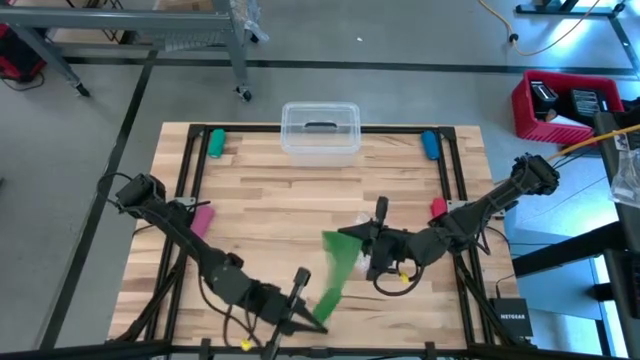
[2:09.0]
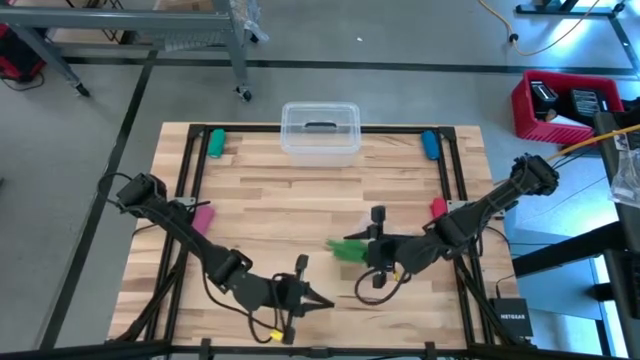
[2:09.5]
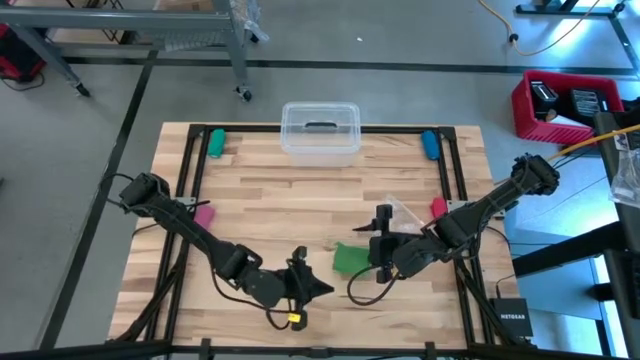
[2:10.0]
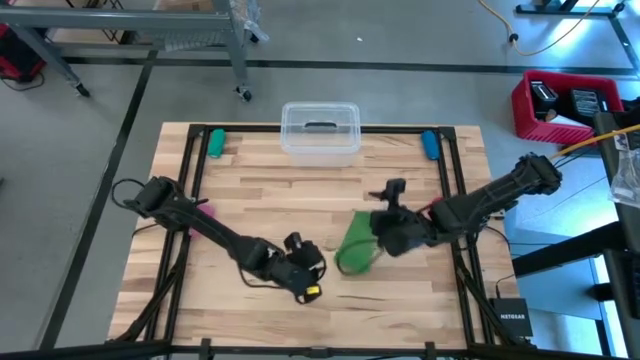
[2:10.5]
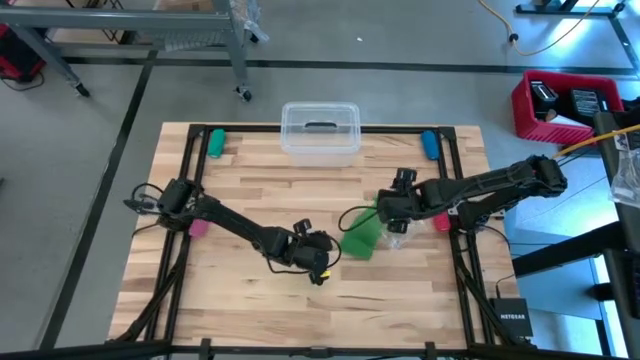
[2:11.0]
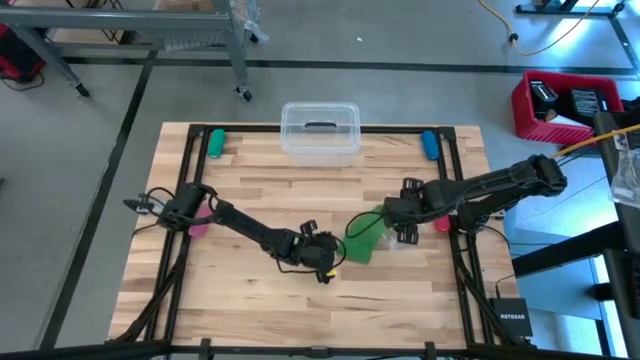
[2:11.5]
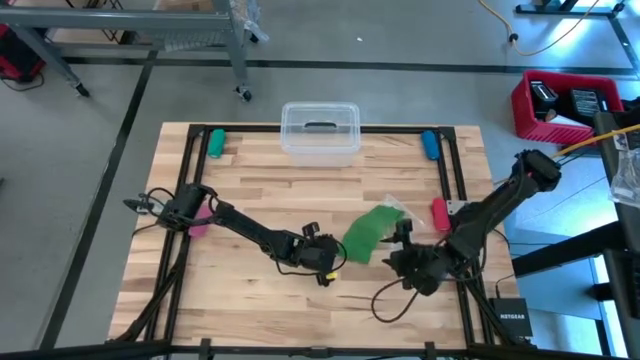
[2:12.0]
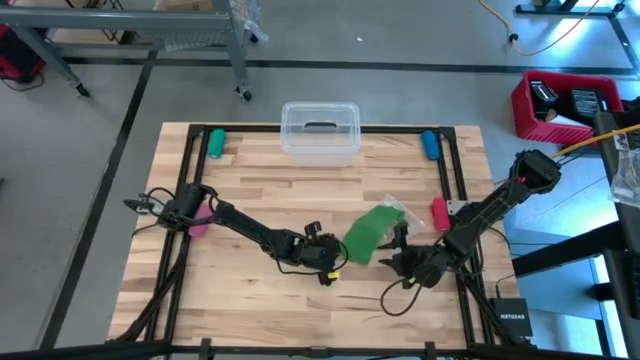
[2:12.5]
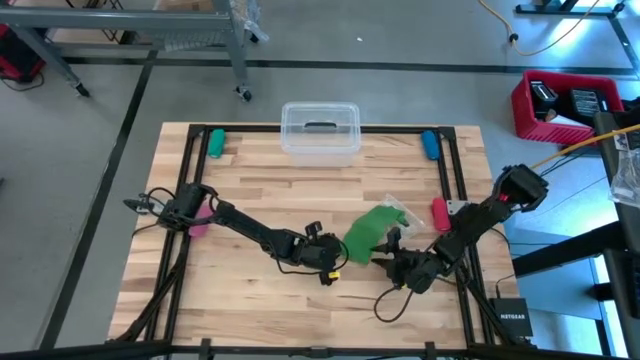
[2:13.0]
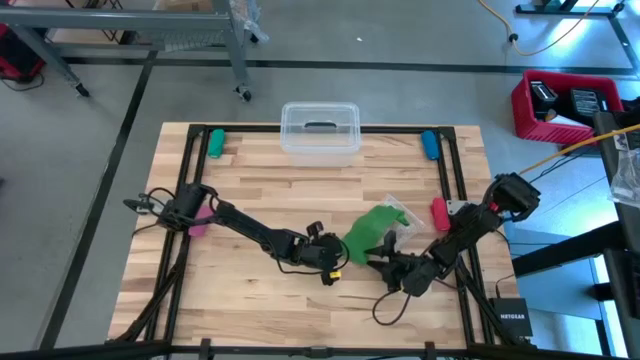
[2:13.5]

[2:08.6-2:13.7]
Task: Roll bandage
Roll the green bandage

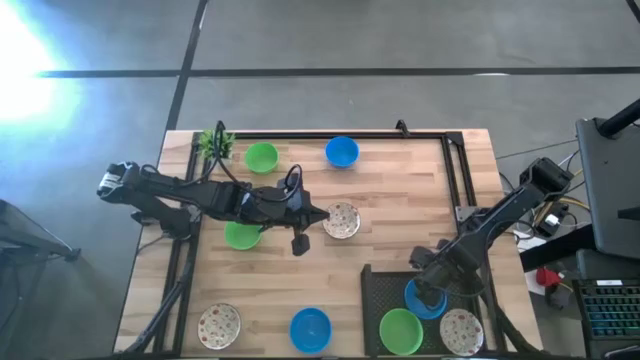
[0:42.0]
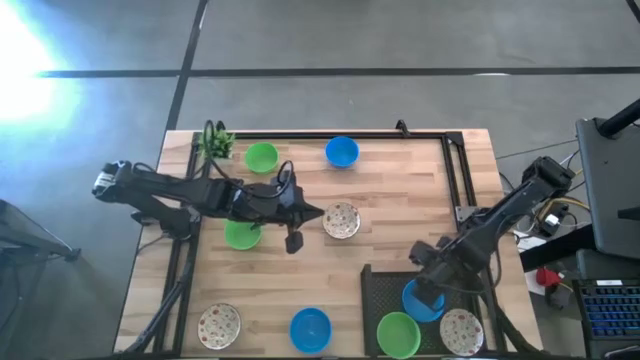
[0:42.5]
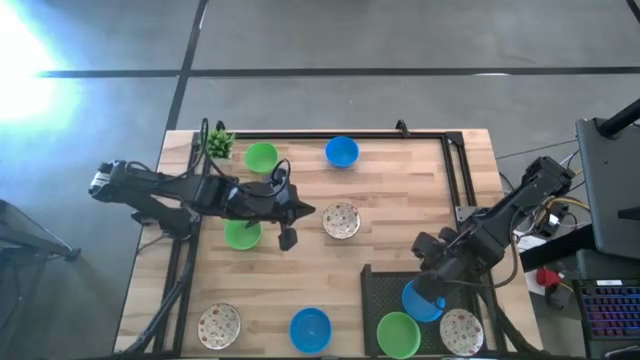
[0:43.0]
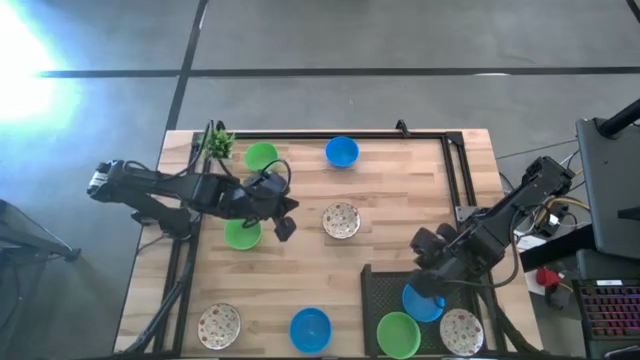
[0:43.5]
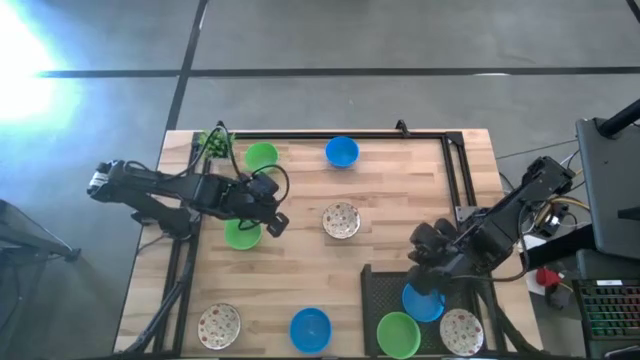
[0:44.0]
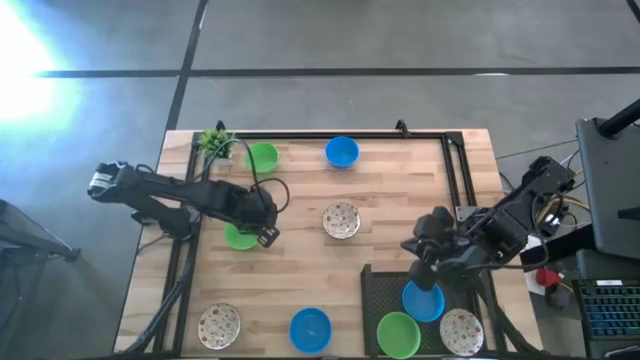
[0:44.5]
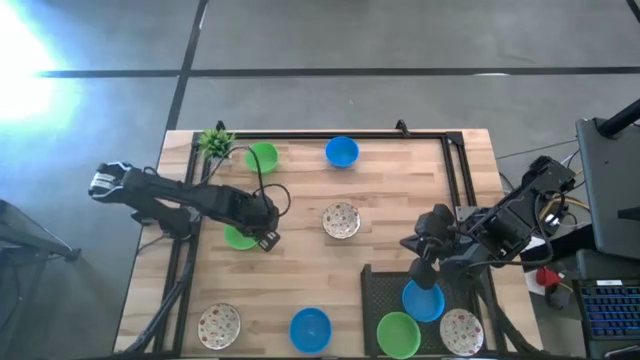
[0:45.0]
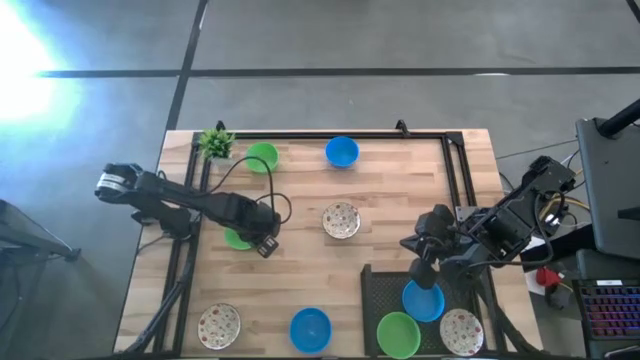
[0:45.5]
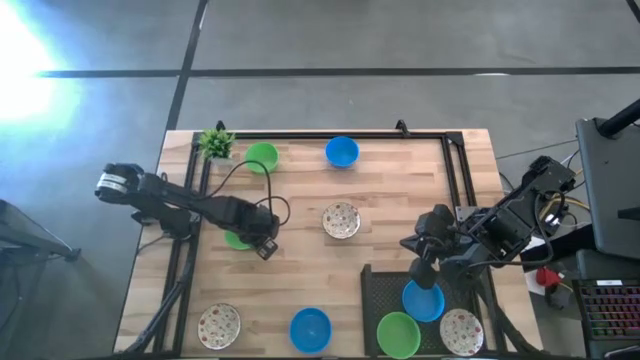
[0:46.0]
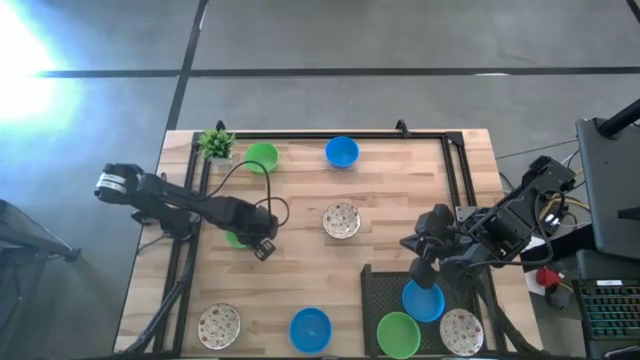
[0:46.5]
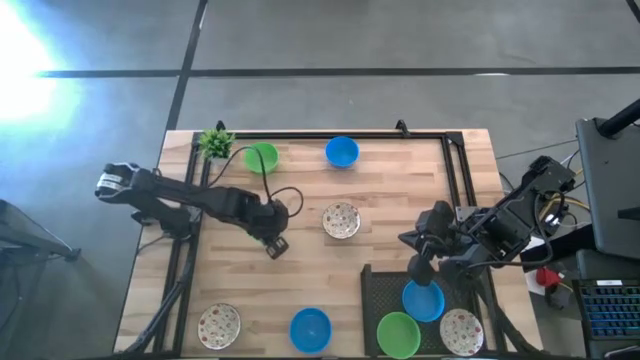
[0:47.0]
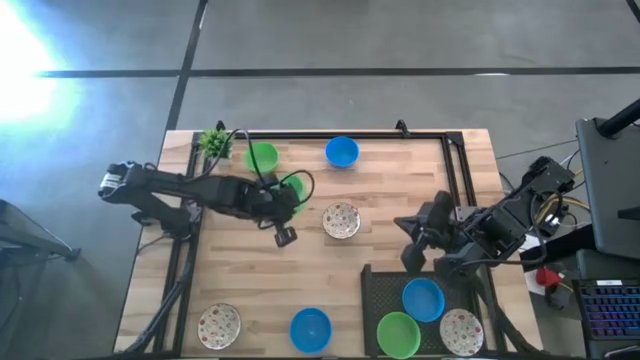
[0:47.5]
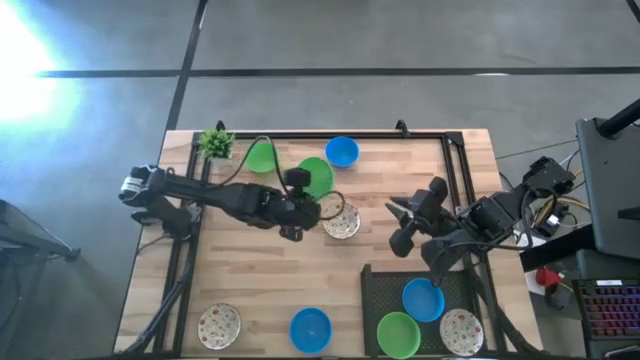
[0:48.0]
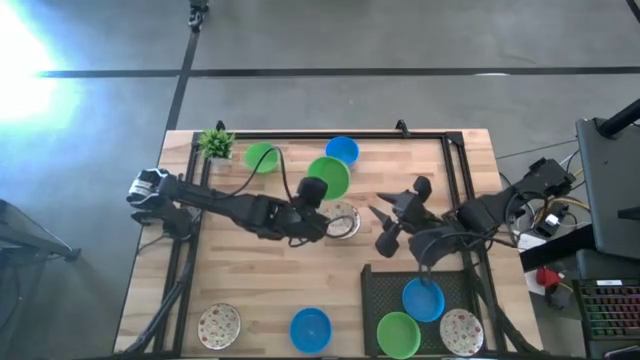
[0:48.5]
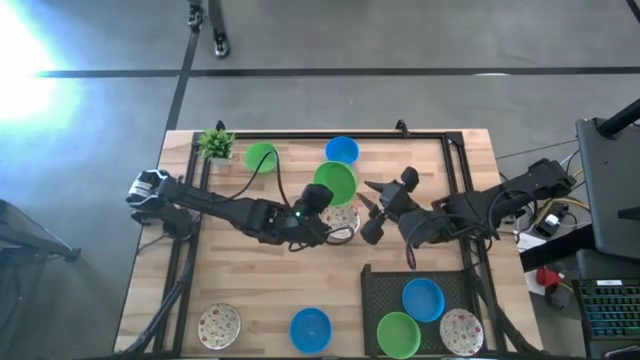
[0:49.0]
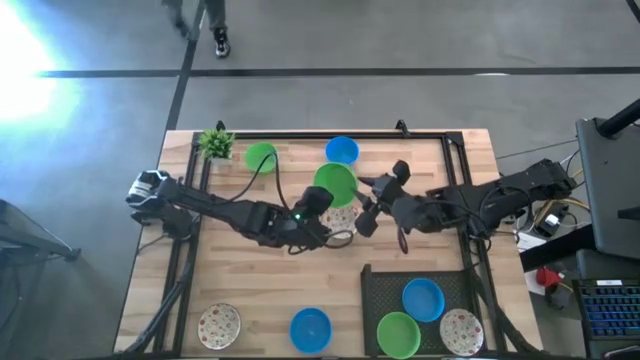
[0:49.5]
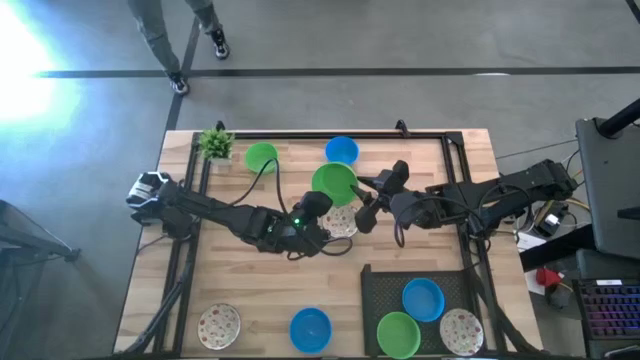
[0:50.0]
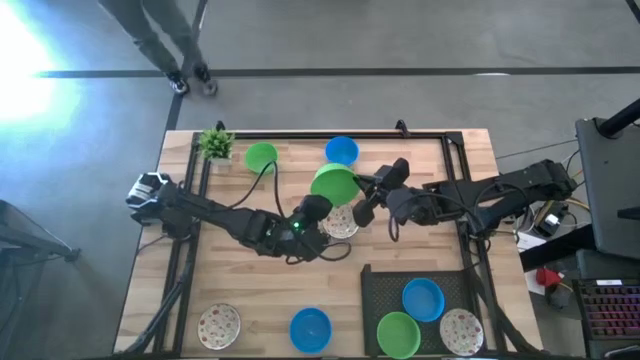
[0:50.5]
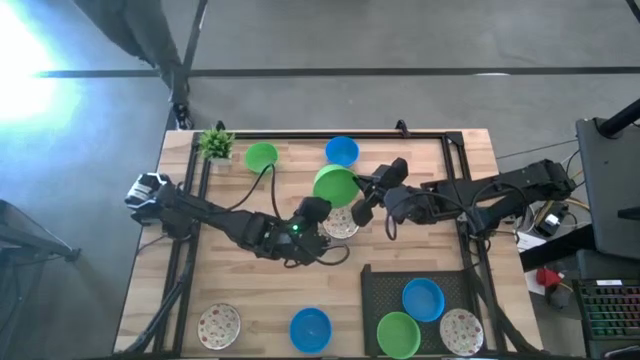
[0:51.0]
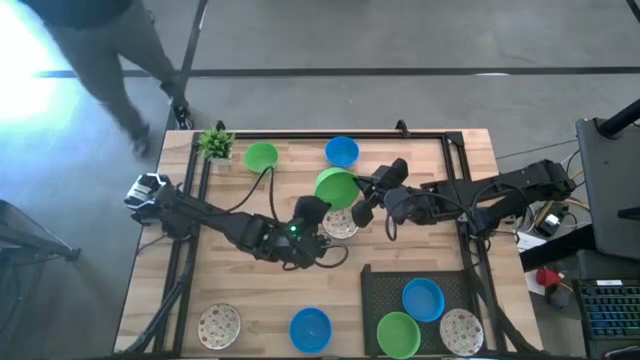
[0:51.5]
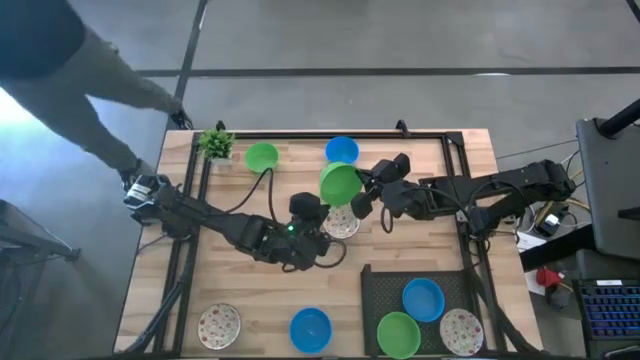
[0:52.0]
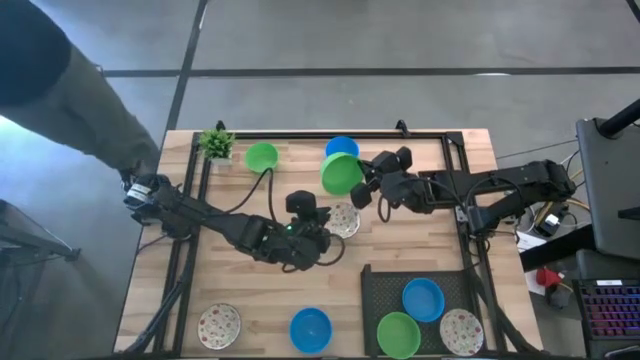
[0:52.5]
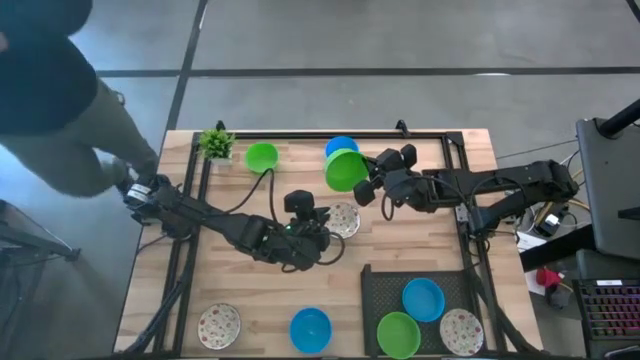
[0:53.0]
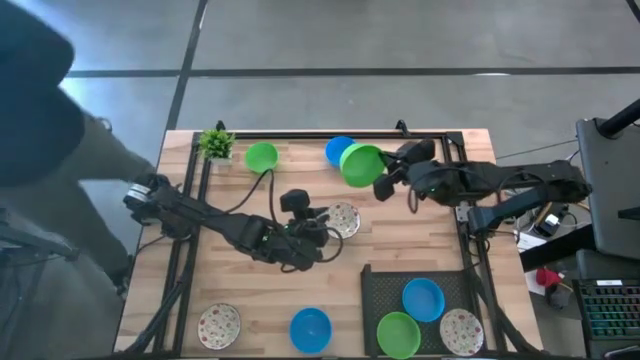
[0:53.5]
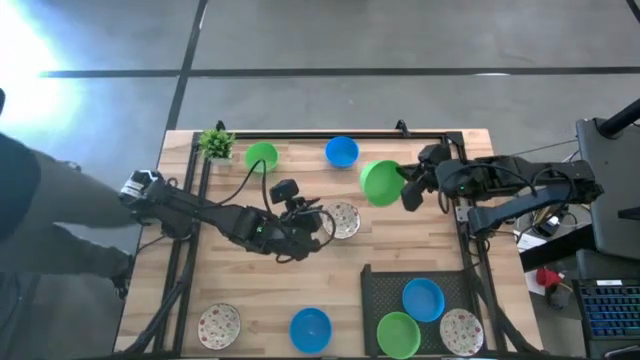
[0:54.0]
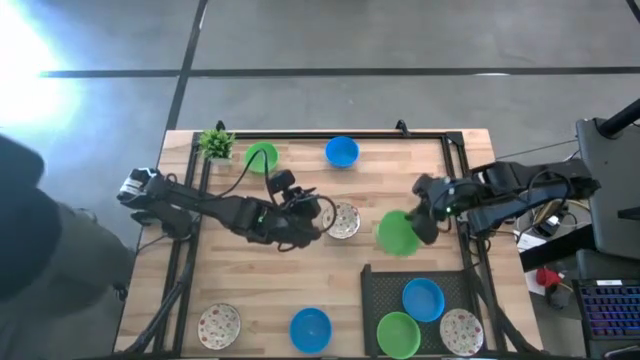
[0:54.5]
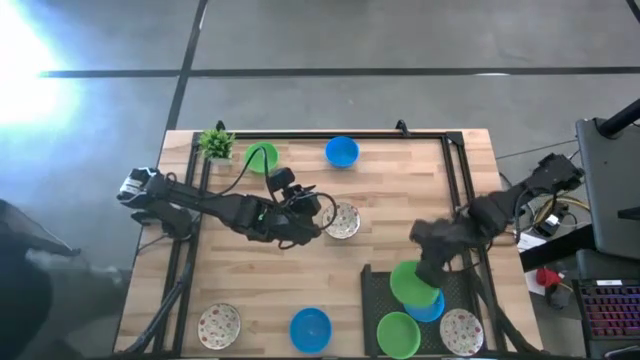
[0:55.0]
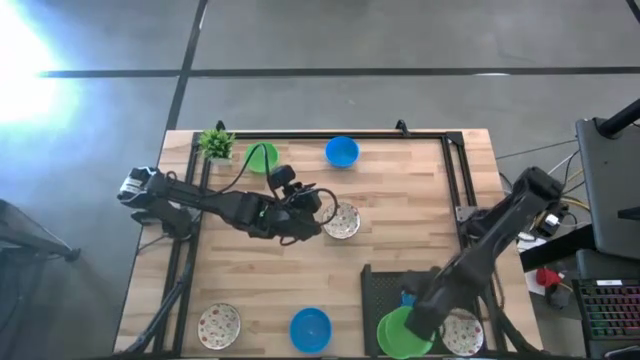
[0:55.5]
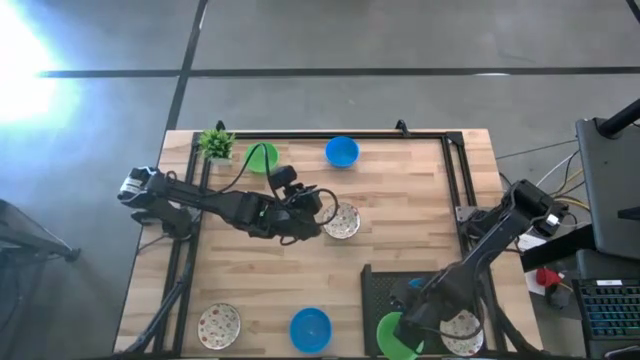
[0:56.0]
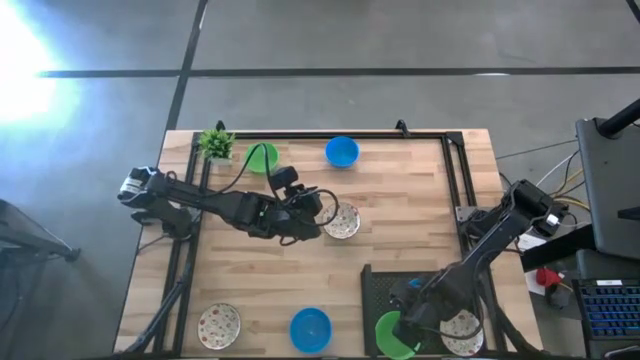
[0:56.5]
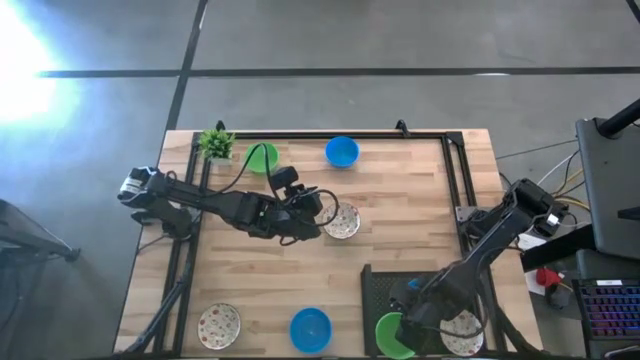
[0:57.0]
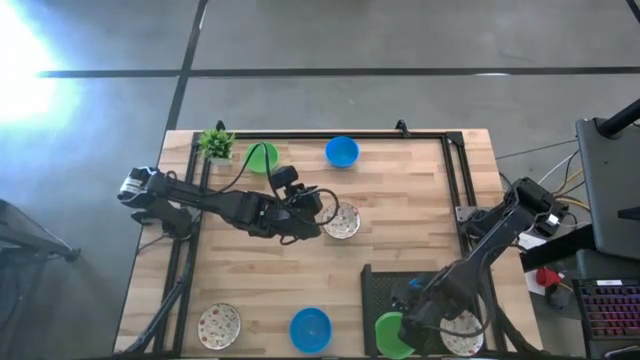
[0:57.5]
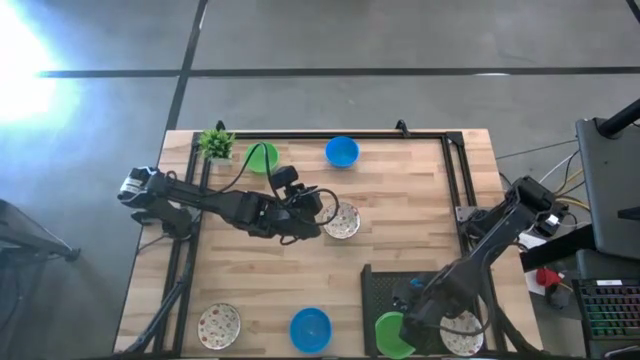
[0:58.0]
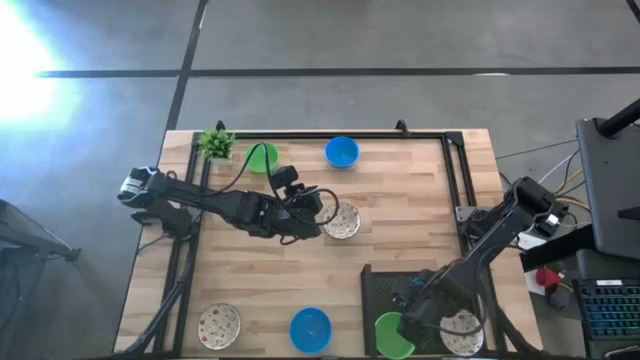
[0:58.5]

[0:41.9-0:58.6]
Task: Pick & Place Mini bowls
Stack the bottom green bowl on top of the green bowl on the shelf
